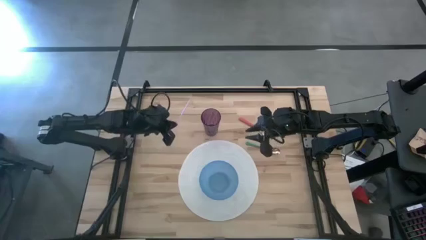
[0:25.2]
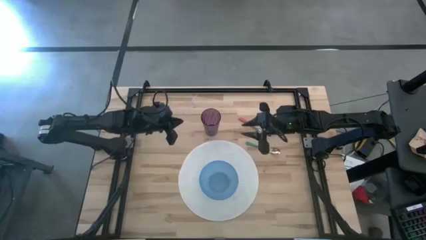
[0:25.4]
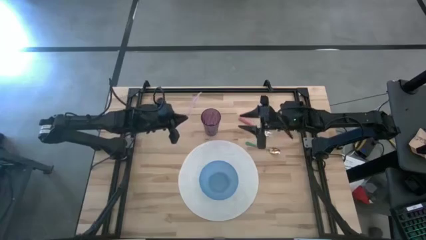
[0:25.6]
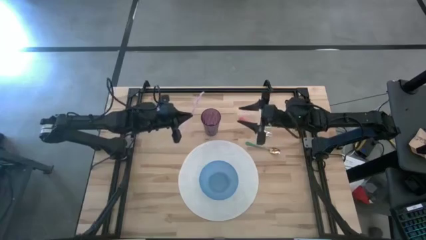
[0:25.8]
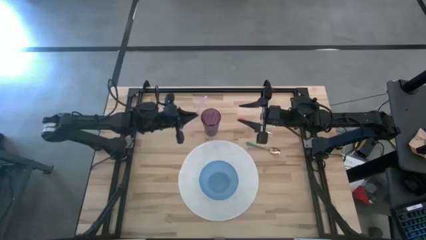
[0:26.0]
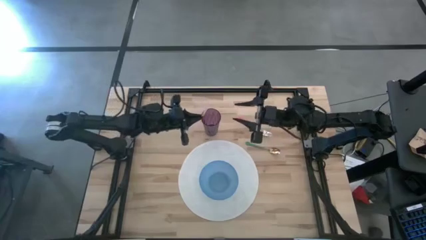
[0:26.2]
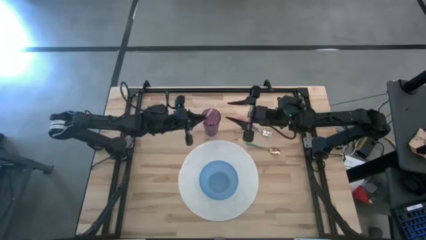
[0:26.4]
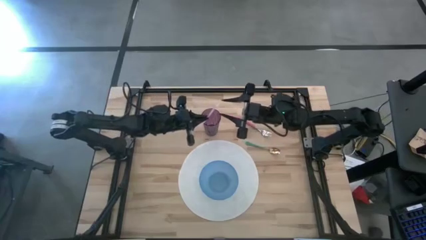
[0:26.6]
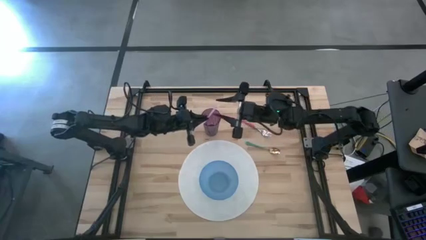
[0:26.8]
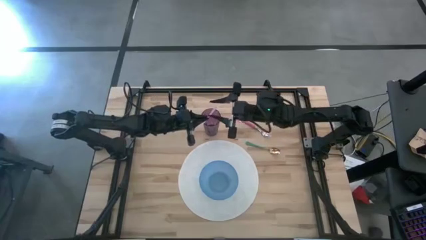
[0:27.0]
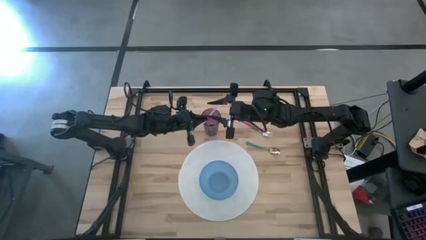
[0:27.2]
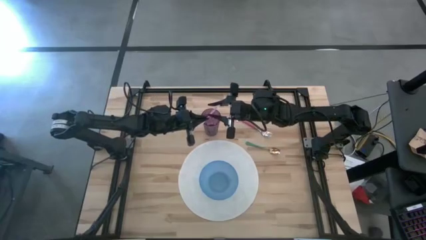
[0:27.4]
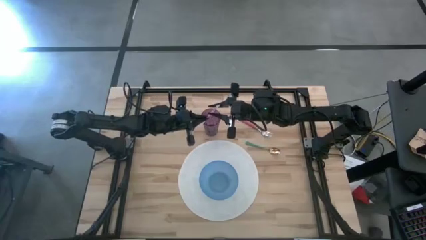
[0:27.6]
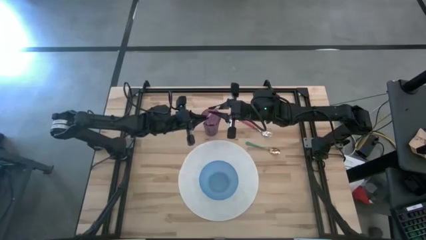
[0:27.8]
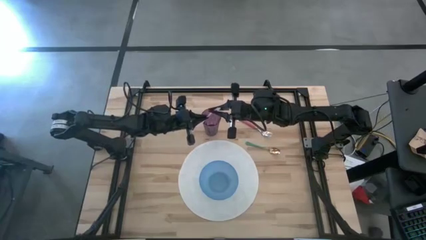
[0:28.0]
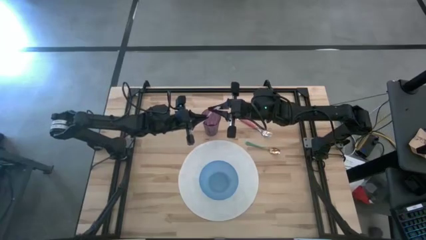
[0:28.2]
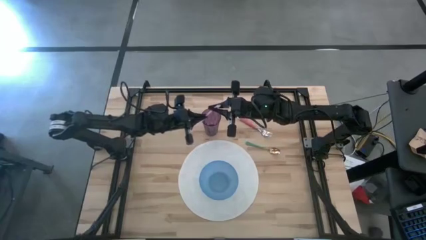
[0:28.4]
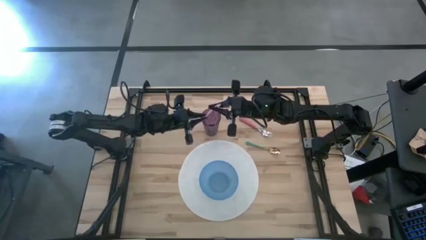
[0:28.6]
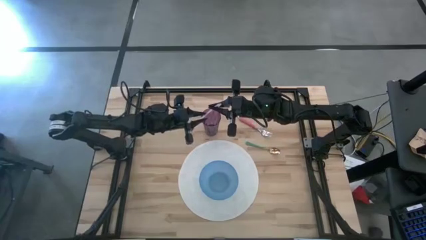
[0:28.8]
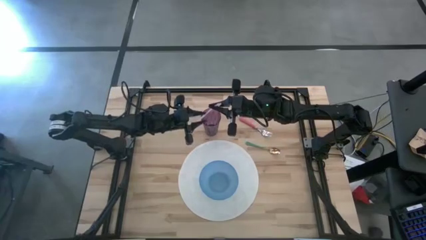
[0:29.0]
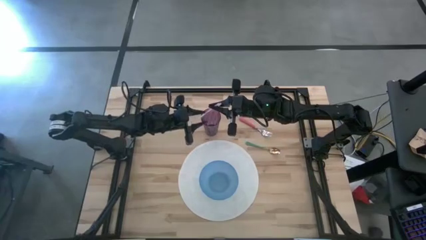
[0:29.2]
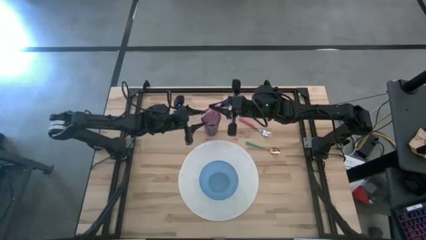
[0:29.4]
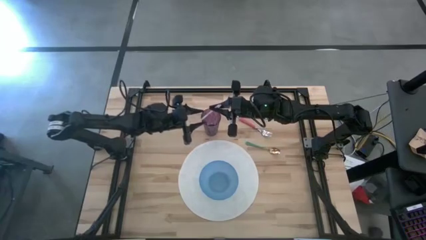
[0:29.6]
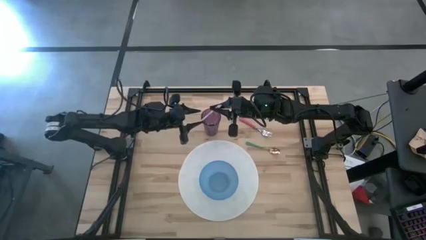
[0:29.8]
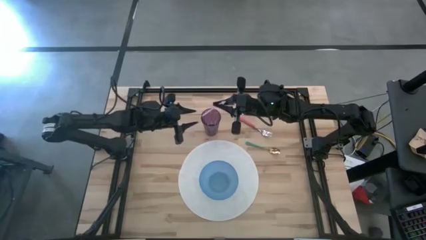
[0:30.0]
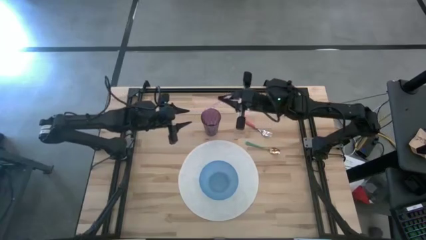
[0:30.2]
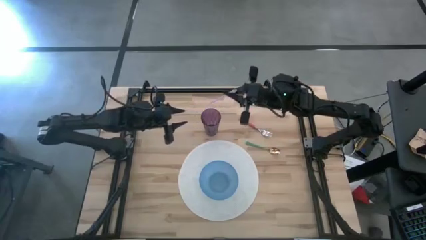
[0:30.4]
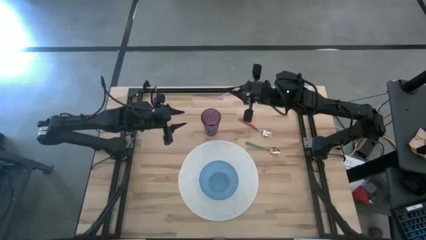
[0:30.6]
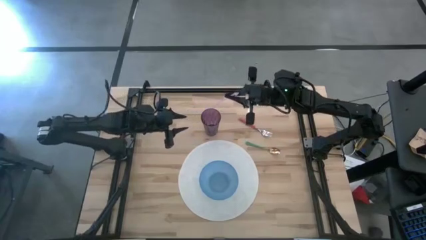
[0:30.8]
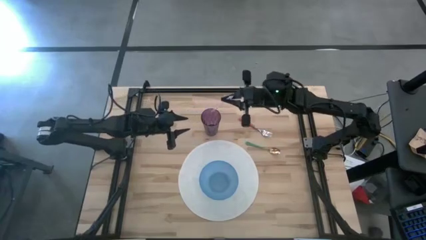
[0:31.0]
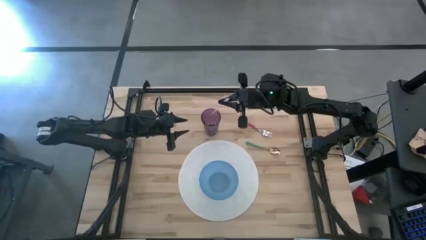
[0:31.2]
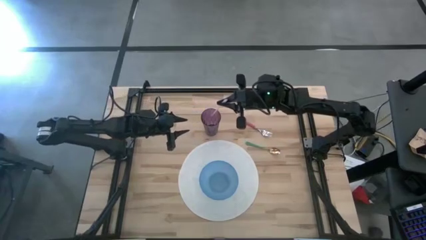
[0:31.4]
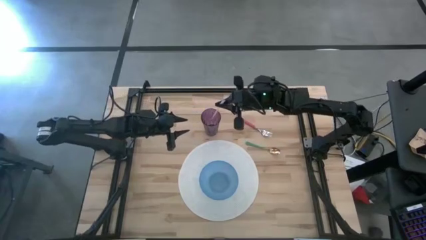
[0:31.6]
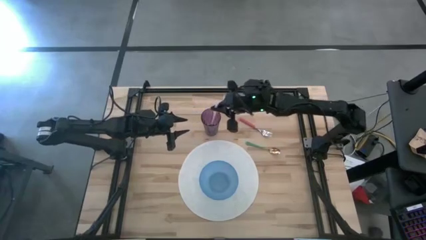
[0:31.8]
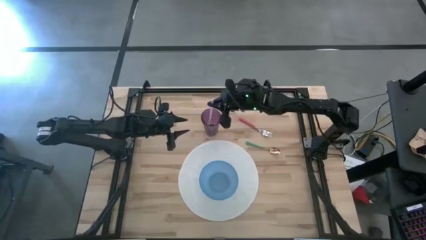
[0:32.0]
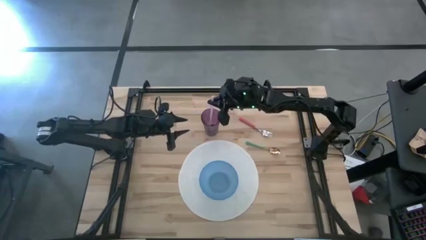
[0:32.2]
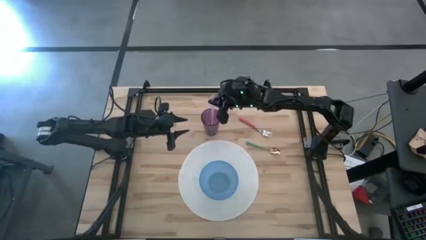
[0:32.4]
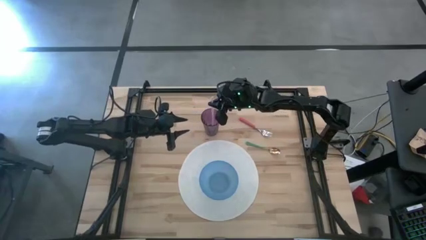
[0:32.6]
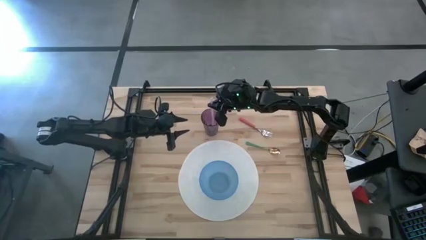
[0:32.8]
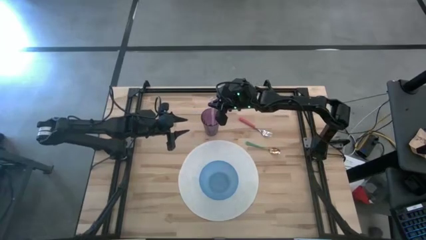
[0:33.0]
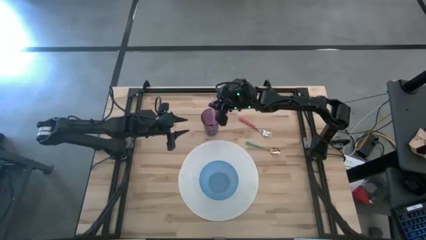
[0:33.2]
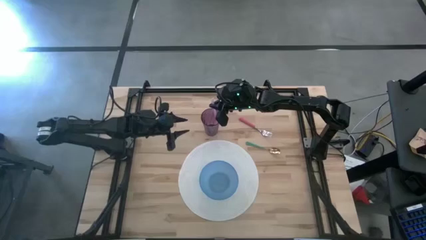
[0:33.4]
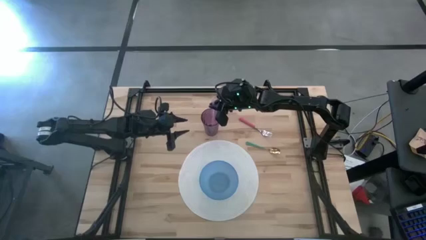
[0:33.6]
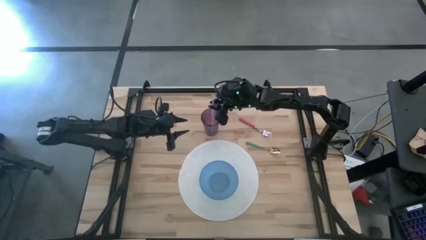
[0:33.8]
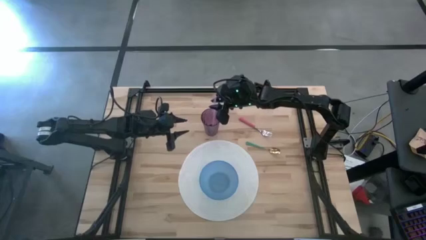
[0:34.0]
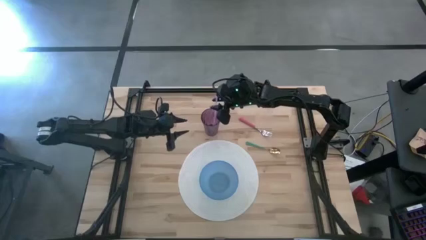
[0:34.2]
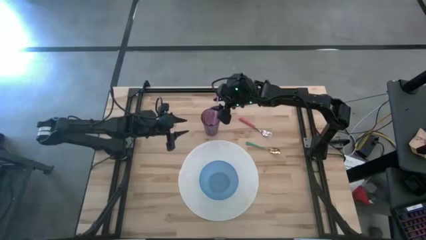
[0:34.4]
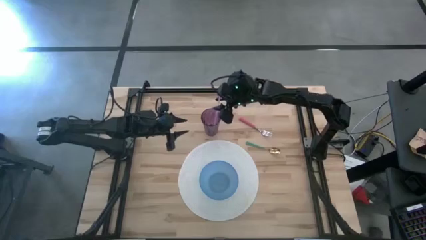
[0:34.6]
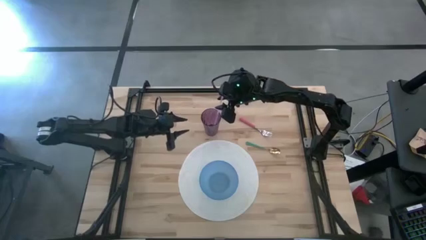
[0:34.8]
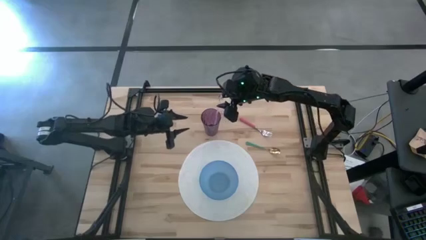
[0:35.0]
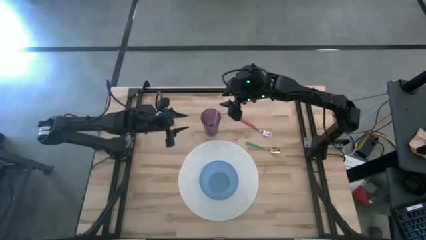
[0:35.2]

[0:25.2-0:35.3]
Task: Pick & Place Utensil
Put the straw into the cup

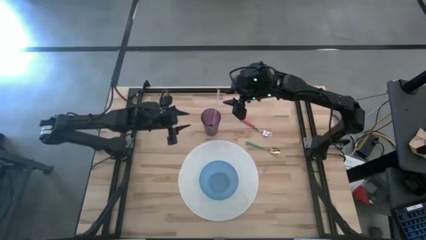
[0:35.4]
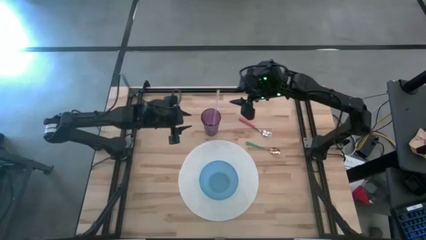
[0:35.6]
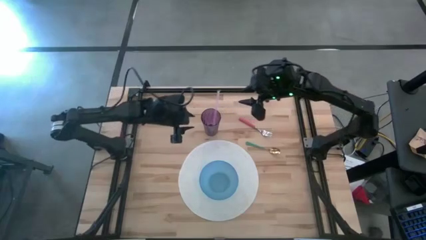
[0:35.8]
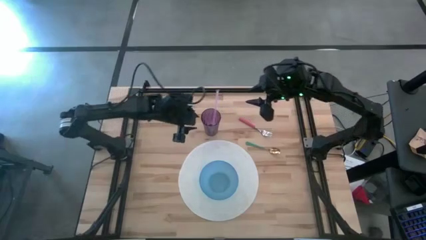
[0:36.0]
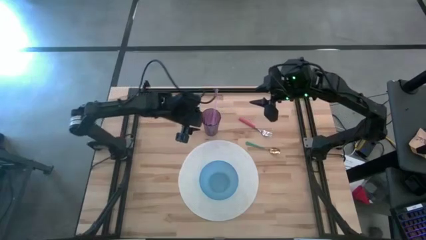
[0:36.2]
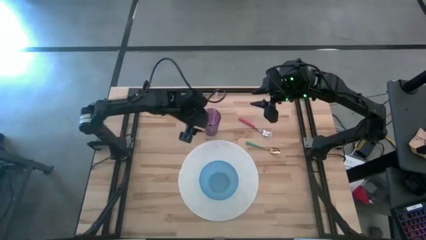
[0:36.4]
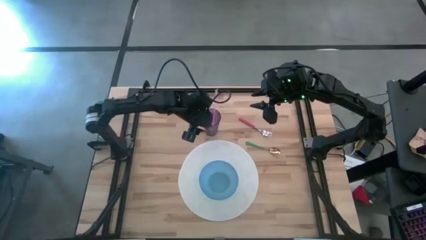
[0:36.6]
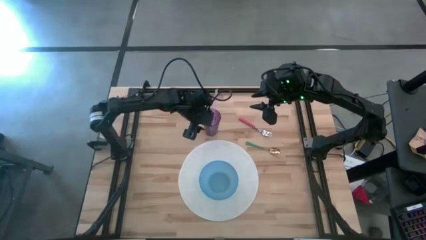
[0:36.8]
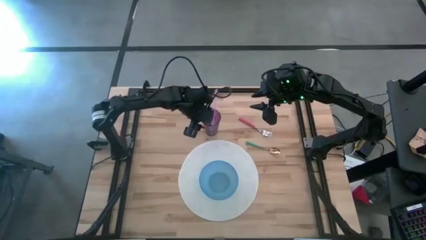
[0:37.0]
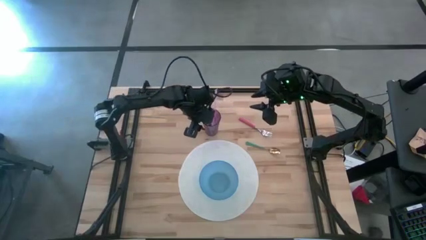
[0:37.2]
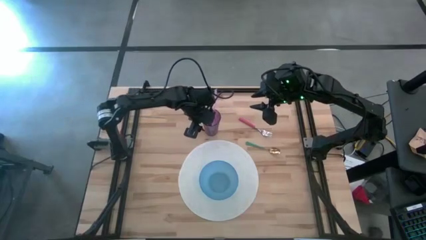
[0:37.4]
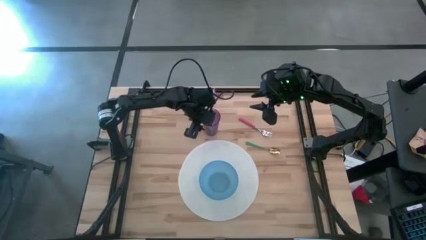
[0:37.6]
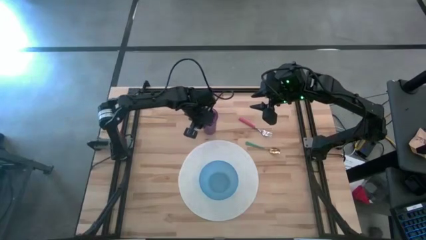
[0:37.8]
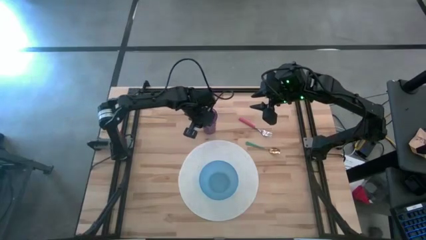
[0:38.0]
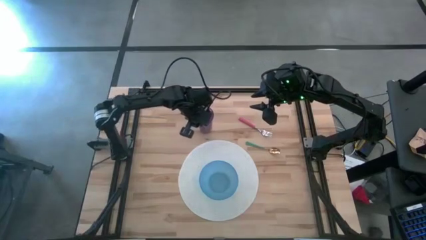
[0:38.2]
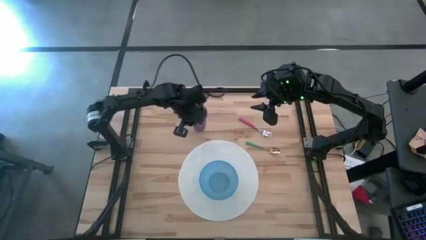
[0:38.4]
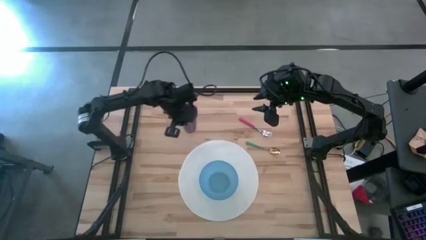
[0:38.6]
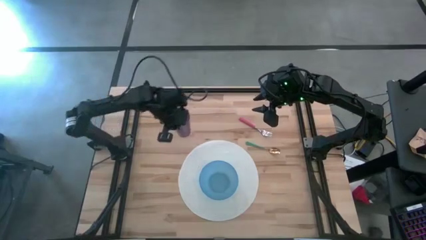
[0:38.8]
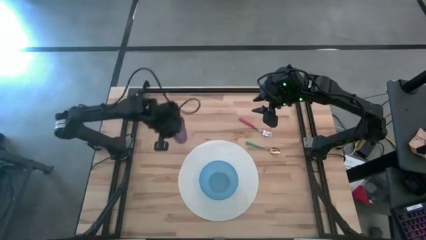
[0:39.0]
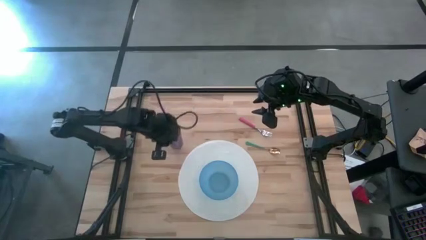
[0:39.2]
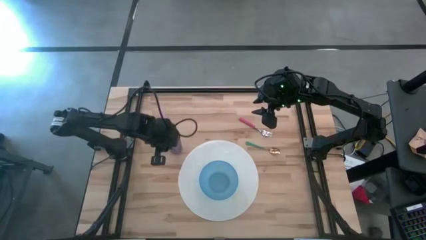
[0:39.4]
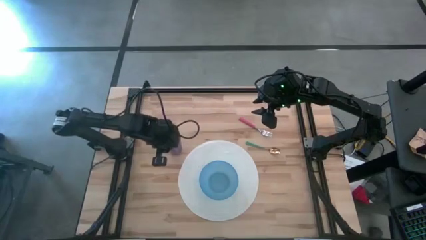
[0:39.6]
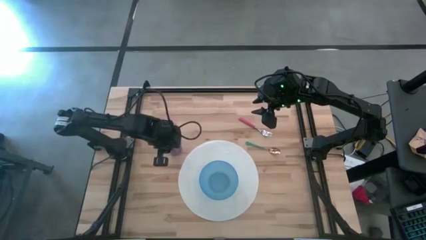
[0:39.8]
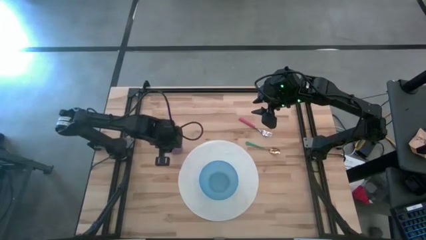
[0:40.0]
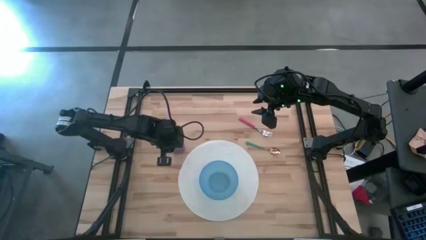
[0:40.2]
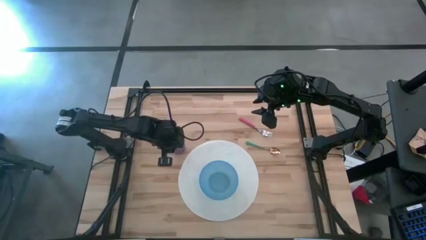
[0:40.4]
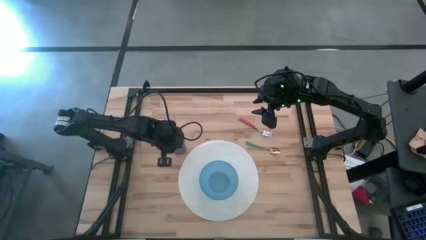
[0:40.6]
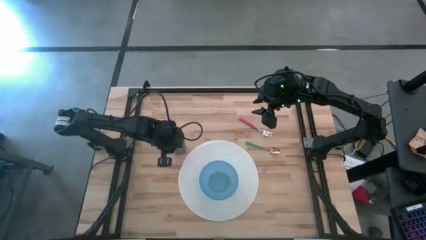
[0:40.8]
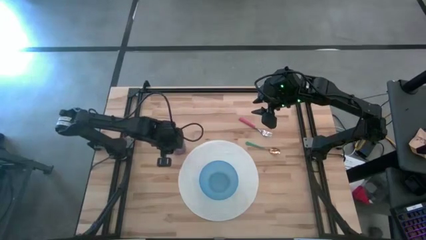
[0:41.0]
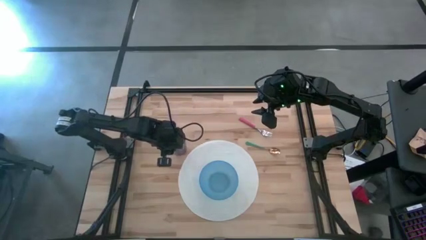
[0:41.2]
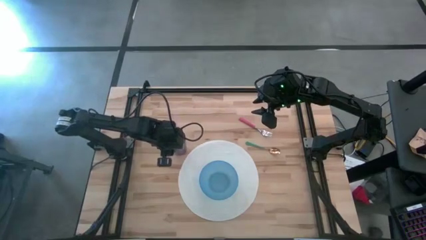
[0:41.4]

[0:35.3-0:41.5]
Put the cup to the top left of the mat
